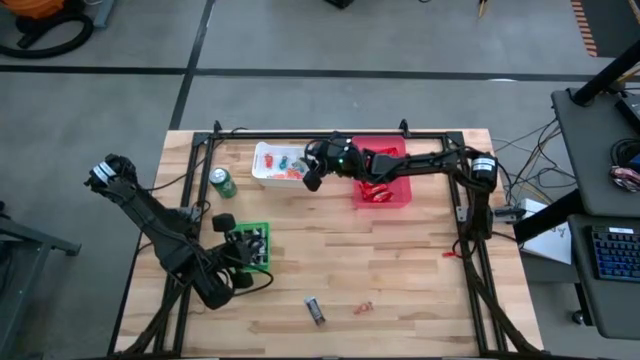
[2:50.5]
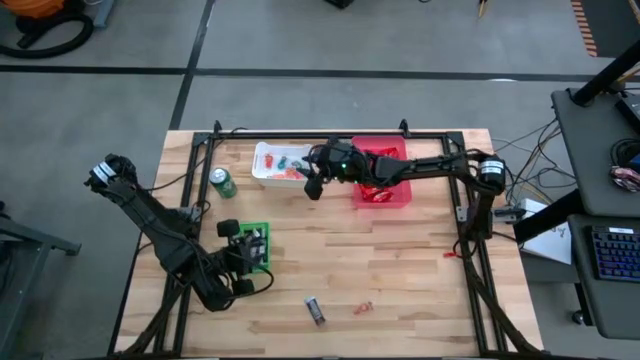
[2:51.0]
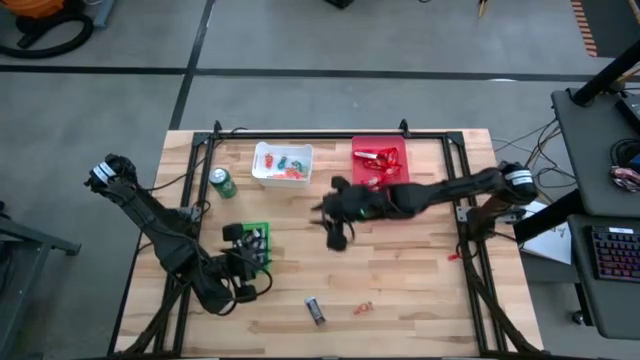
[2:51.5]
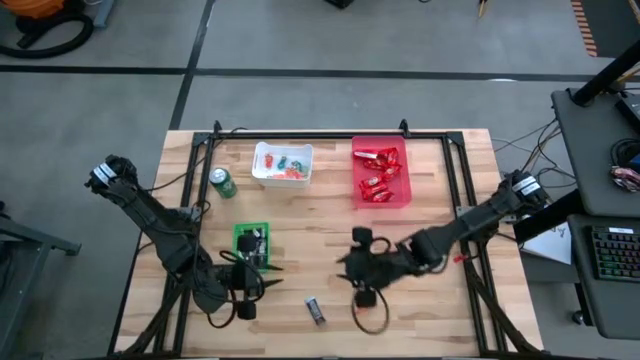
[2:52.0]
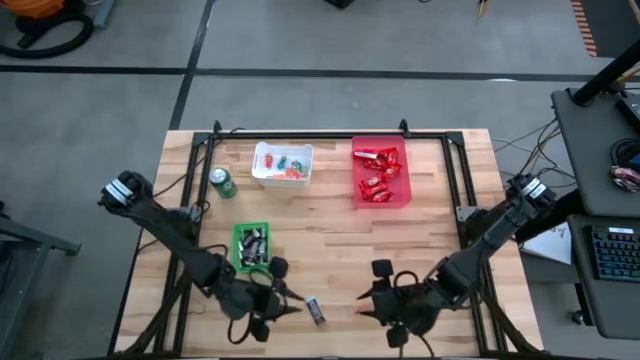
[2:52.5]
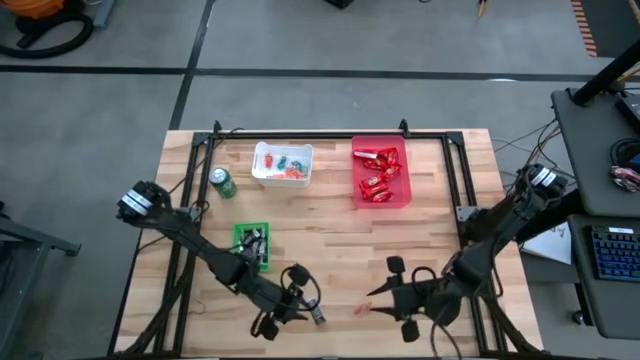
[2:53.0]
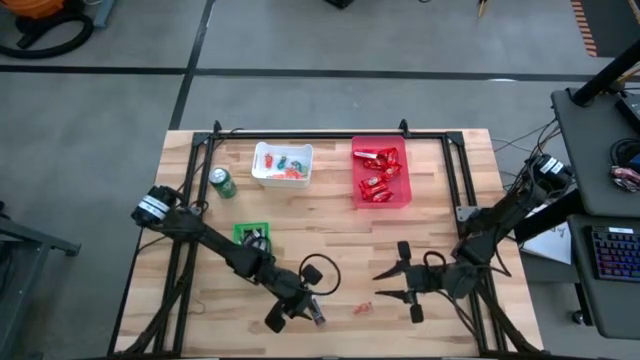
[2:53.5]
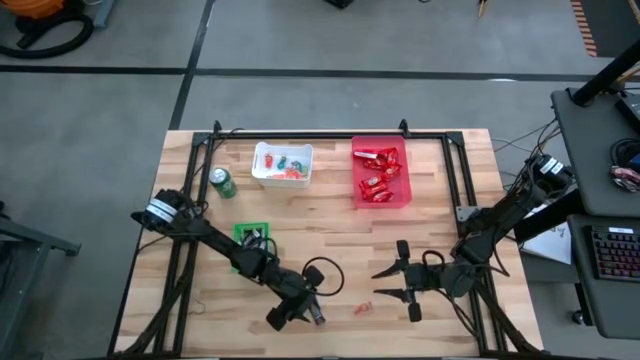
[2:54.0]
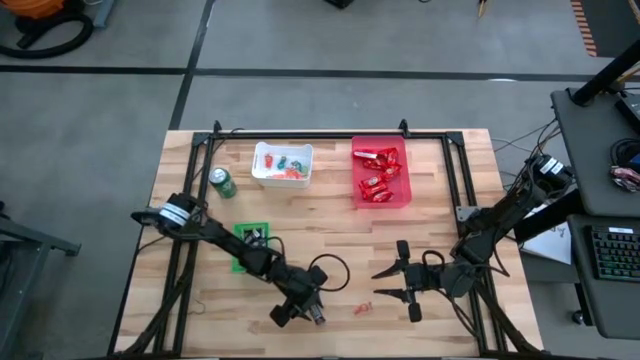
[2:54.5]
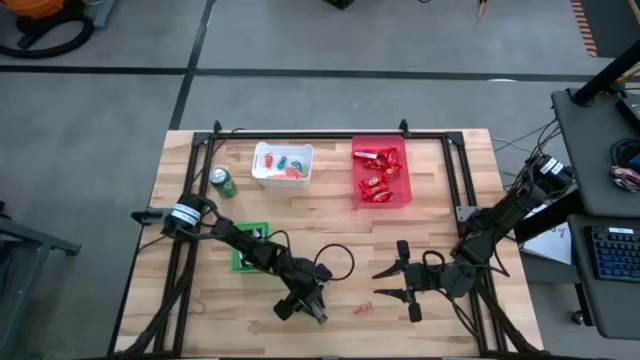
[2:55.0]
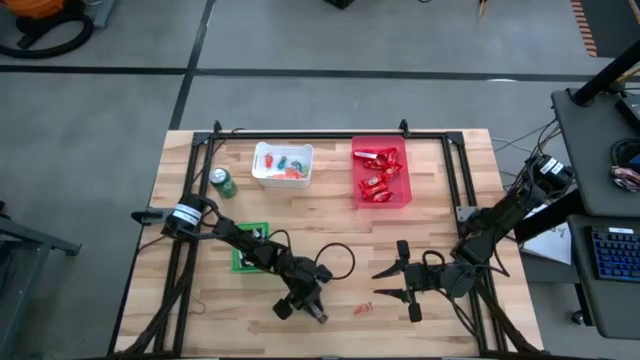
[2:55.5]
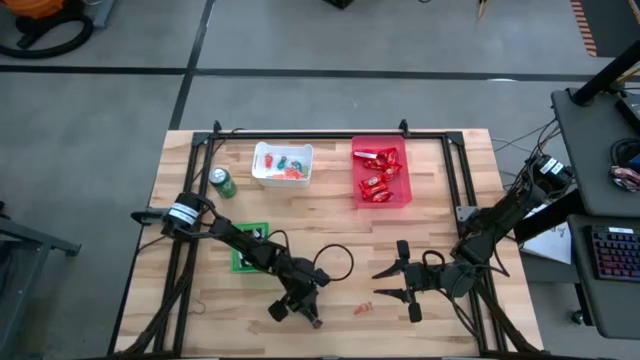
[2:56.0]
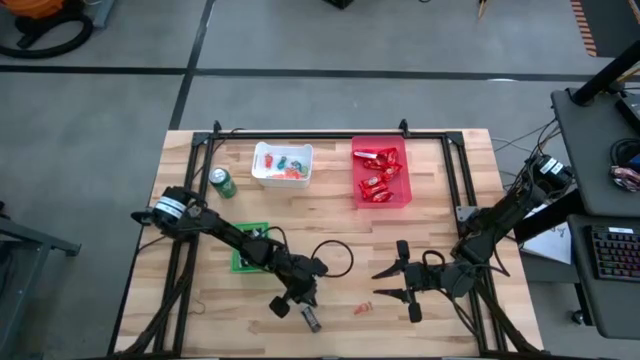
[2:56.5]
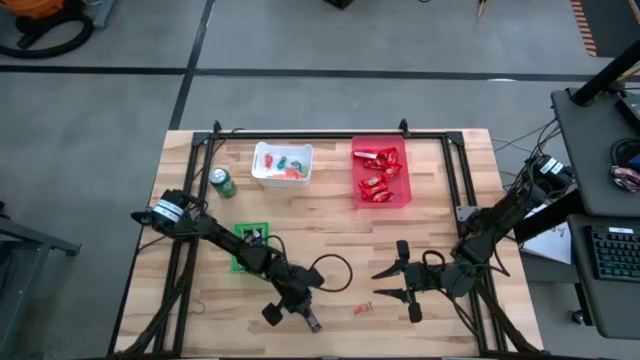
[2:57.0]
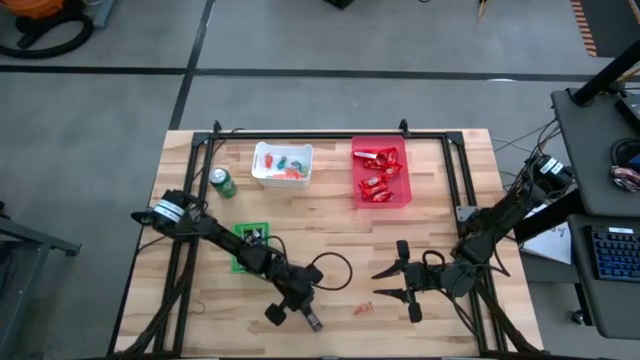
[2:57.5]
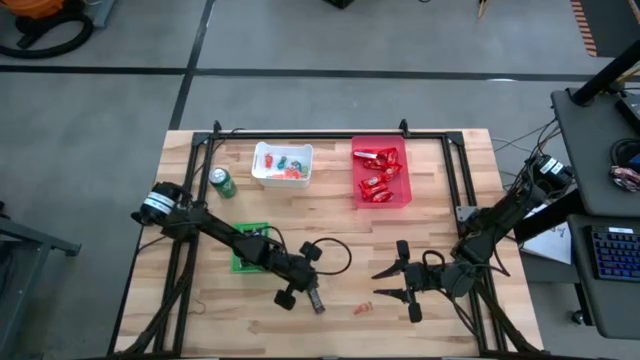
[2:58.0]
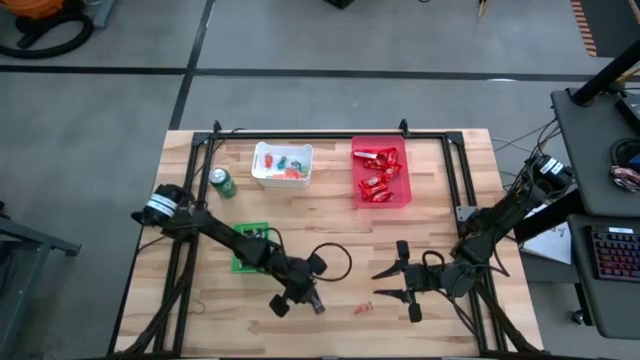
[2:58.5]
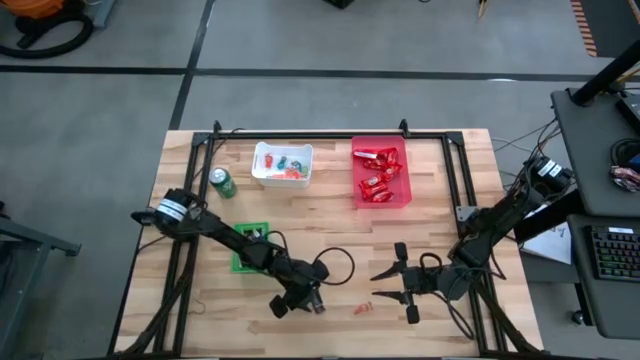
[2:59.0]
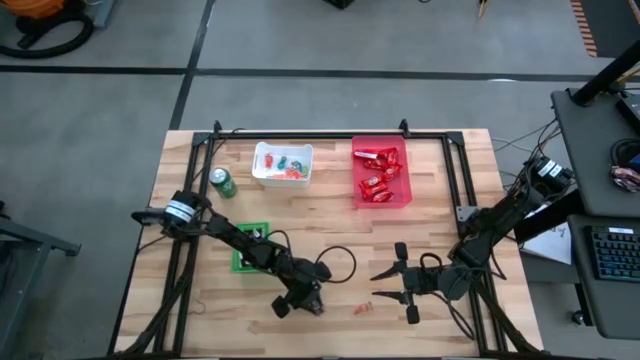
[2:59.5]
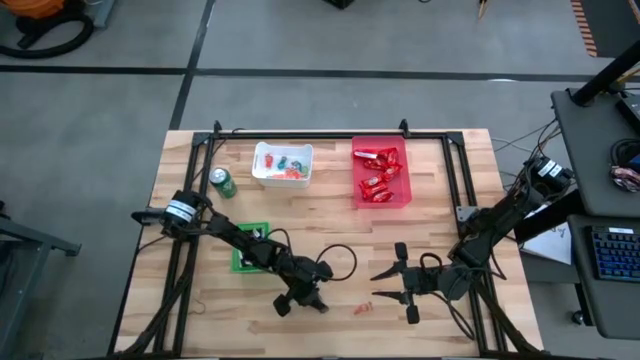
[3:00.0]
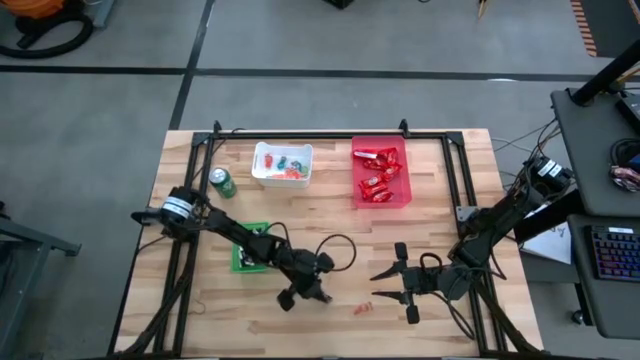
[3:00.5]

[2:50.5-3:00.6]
Task: Organize candy in baskets
Put the brown chocolate into the green basket

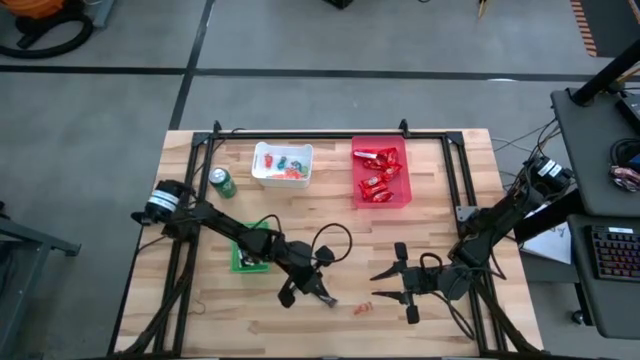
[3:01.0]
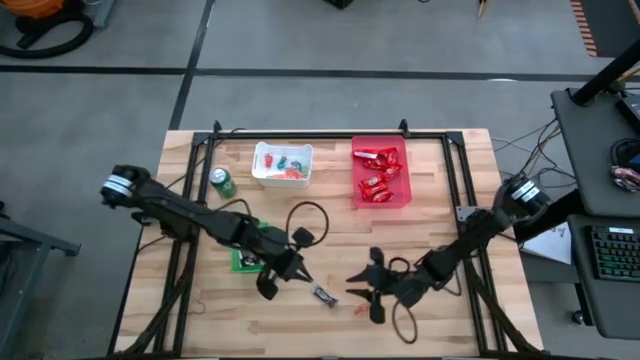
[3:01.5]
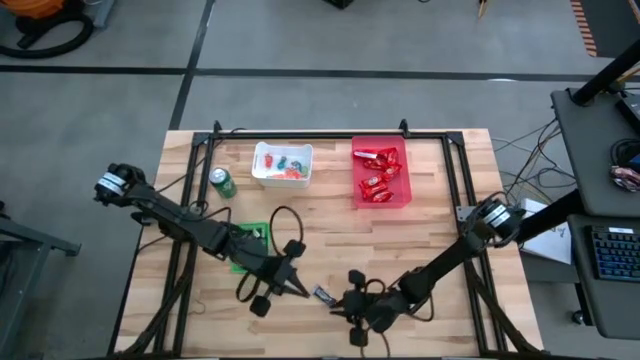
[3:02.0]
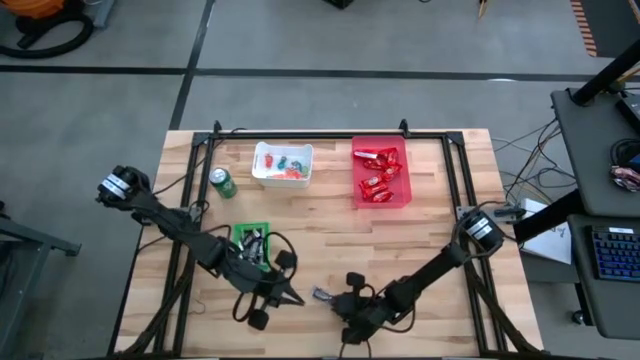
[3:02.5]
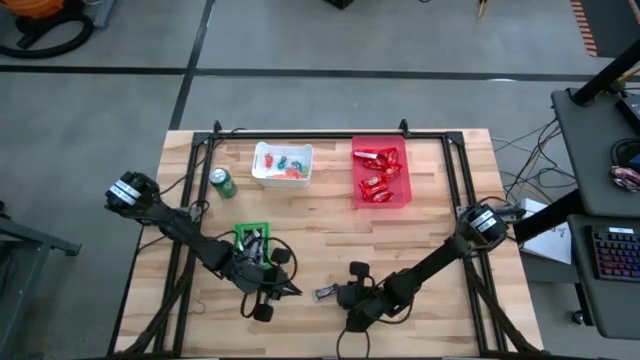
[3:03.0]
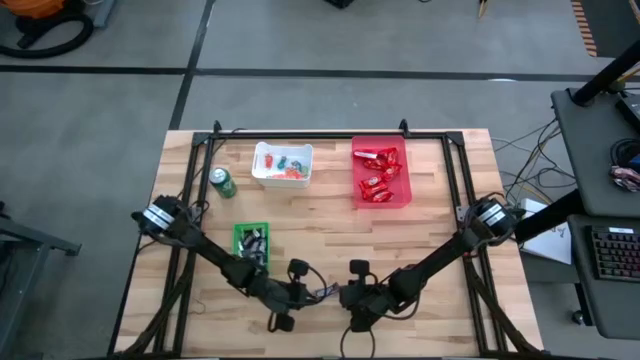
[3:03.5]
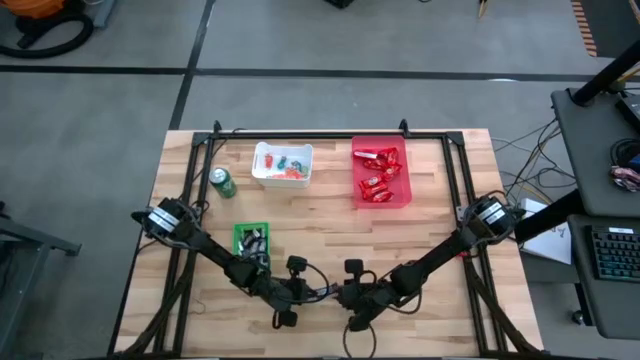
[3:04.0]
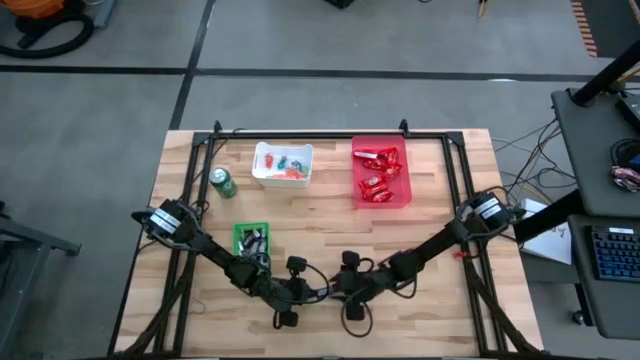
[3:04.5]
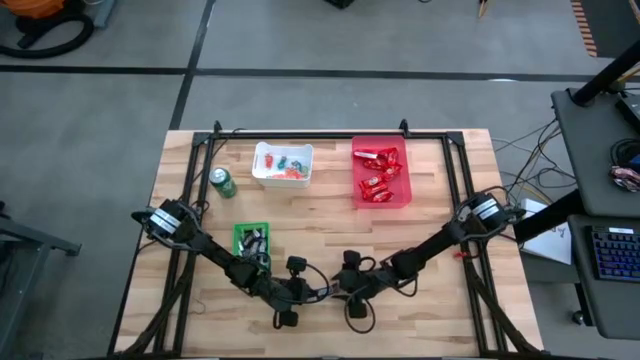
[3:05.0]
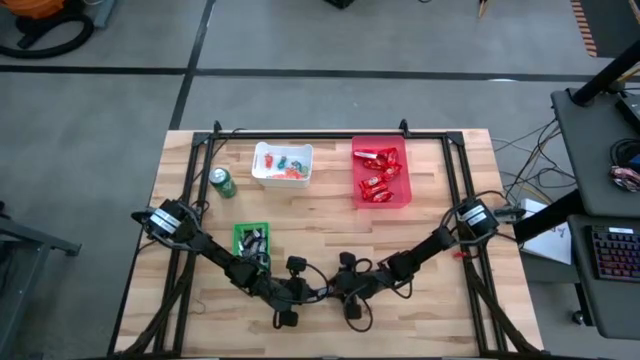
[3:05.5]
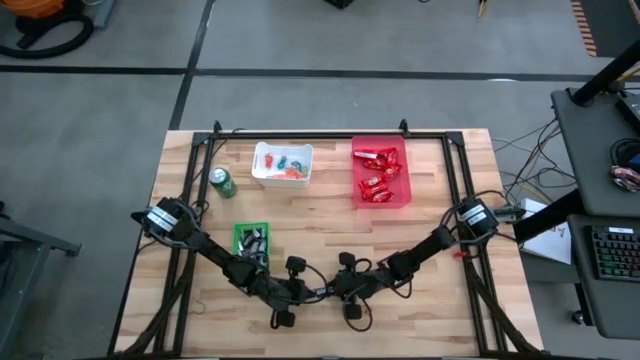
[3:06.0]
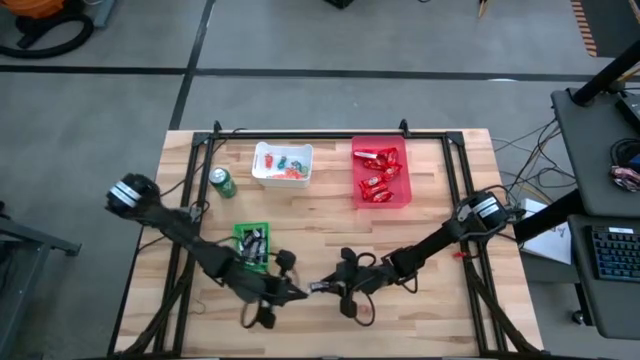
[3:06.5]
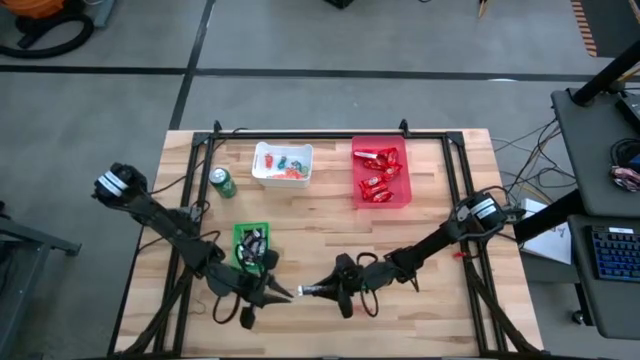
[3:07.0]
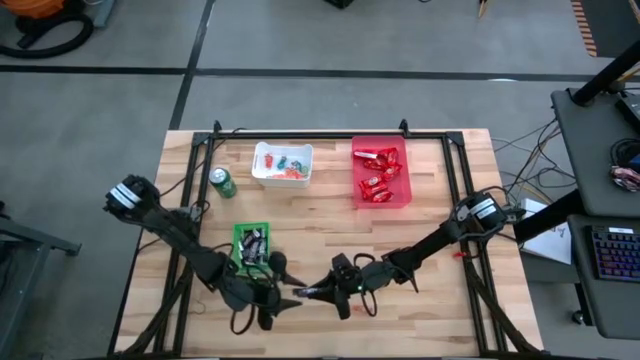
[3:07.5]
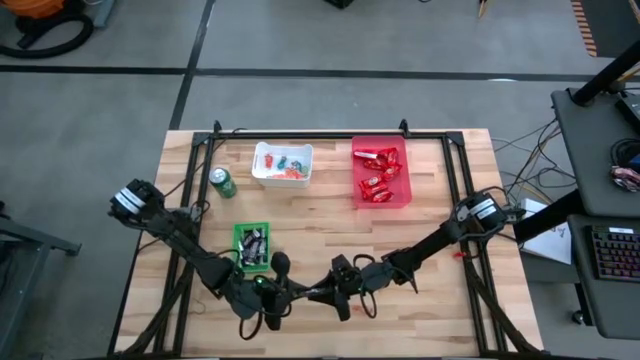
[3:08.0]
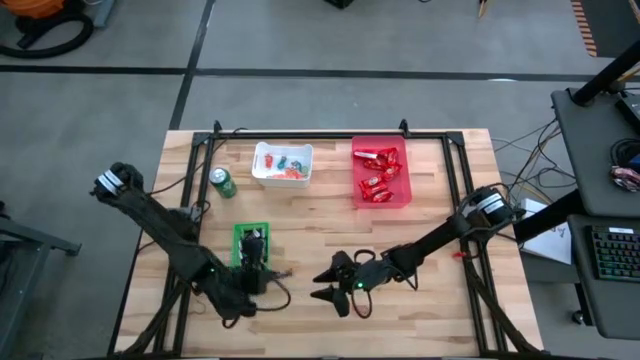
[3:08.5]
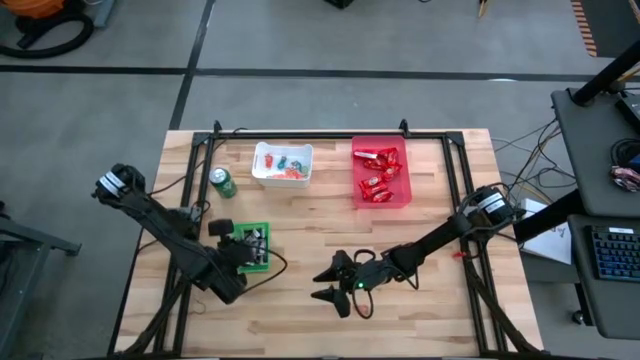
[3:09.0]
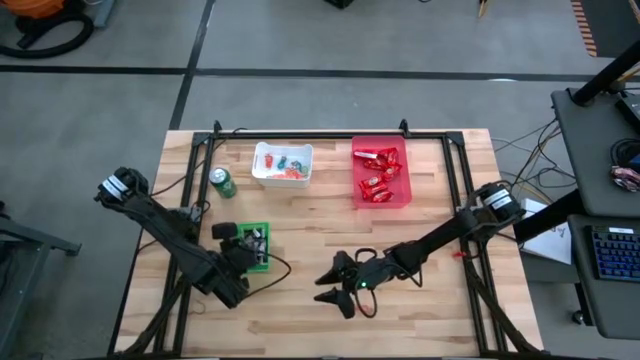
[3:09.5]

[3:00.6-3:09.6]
Put the brown chocolate into the green basket

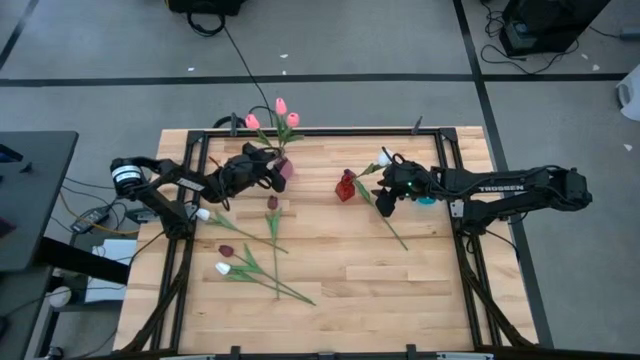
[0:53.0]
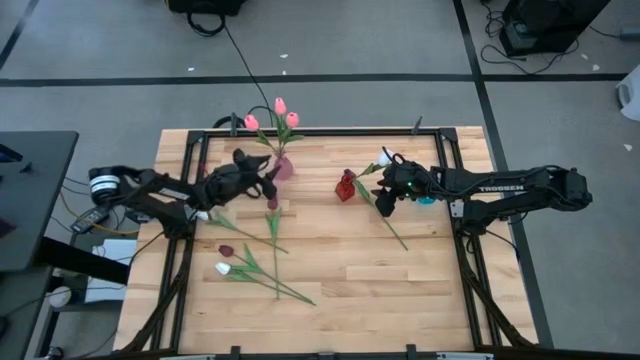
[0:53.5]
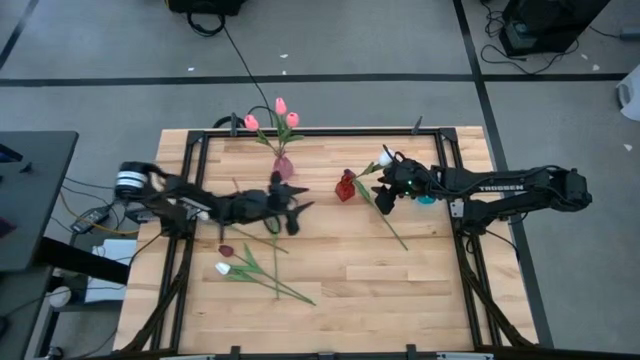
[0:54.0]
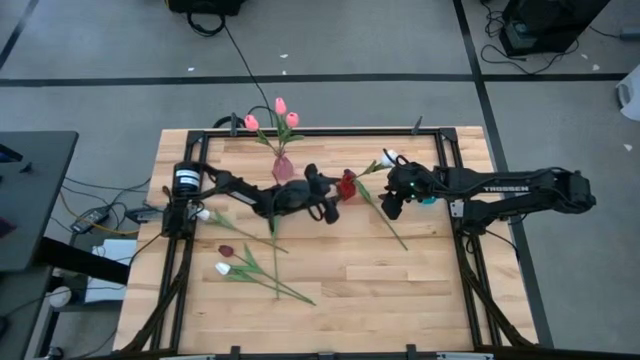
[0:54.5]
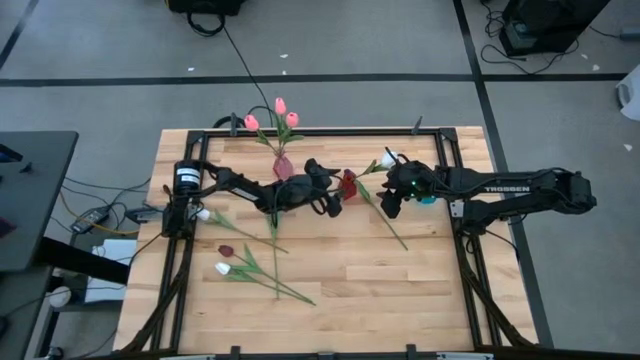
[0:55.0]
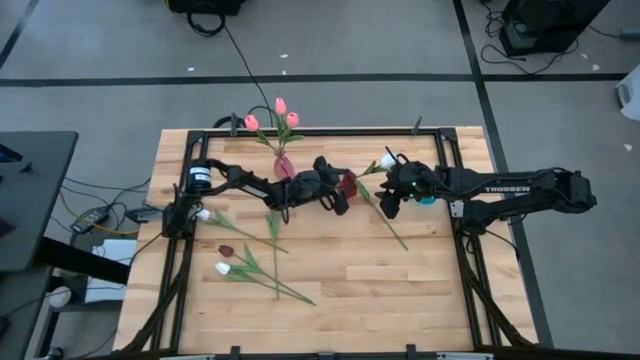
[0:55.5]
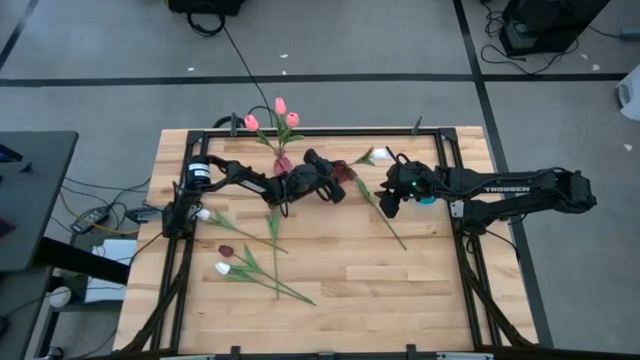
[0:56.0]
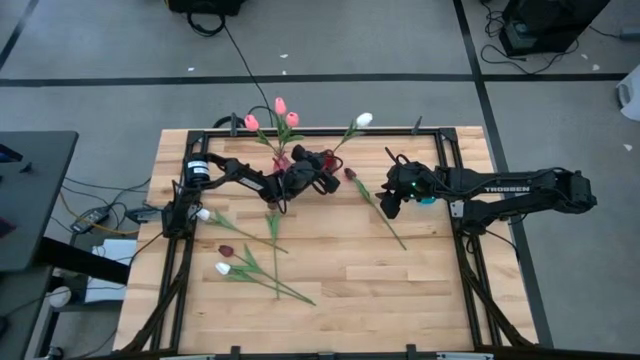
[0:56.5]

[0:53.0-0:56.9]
Task: Sort flowers into vase by color
Move the red vase to the top center of the table
